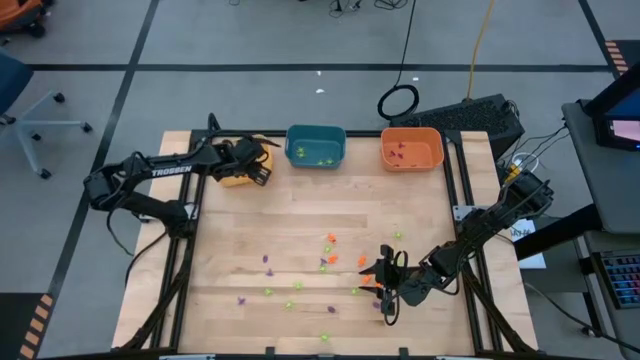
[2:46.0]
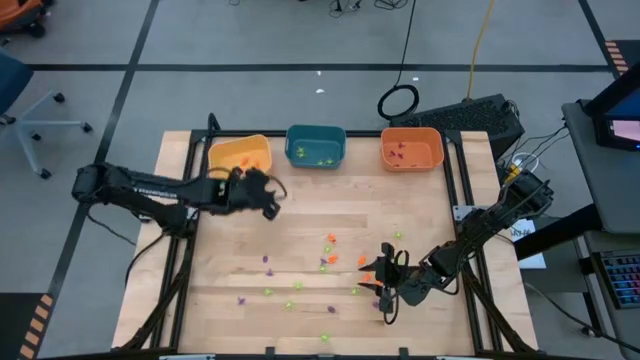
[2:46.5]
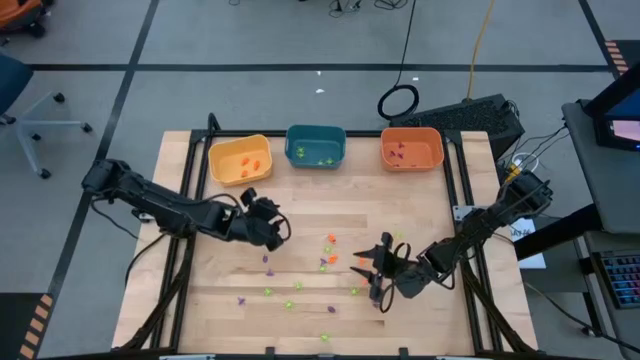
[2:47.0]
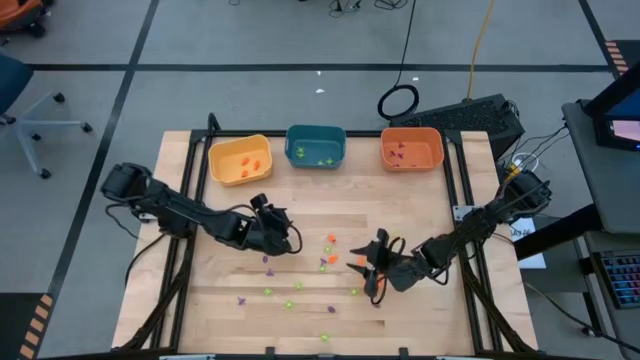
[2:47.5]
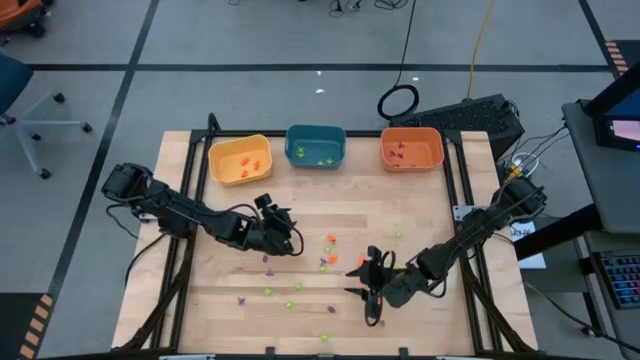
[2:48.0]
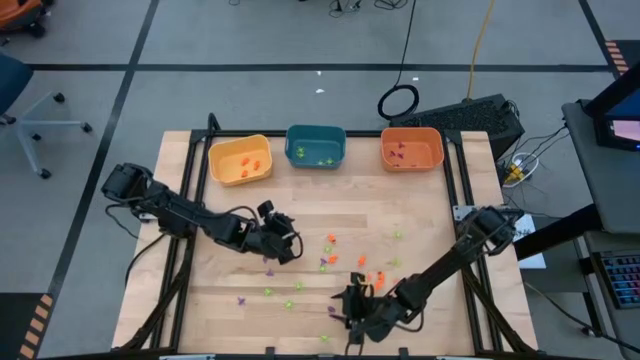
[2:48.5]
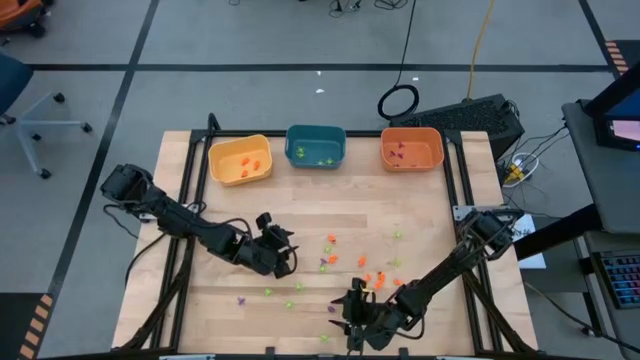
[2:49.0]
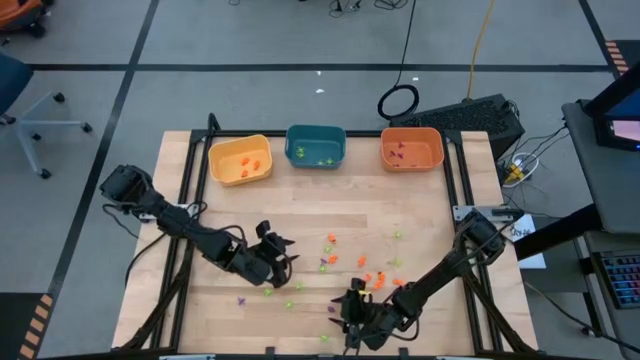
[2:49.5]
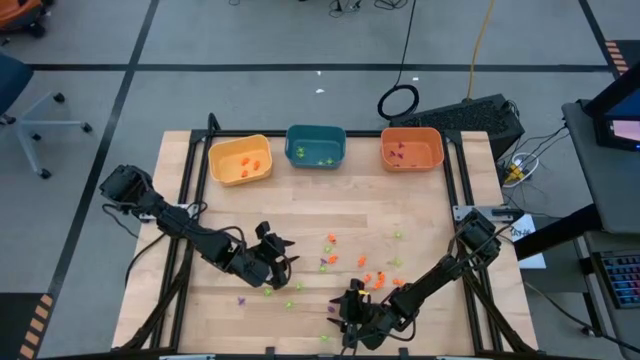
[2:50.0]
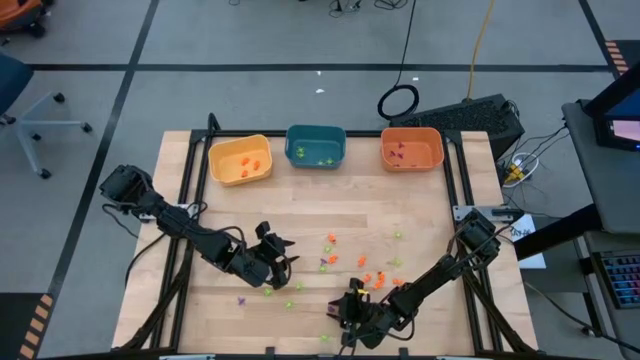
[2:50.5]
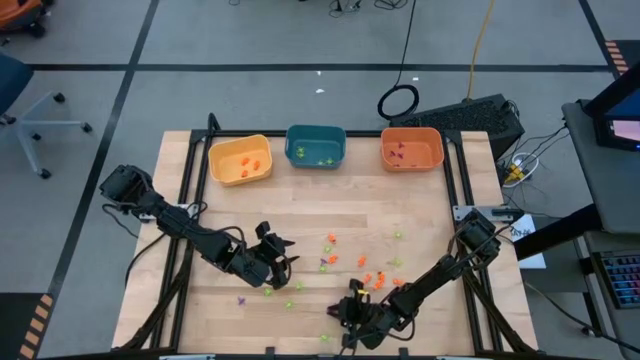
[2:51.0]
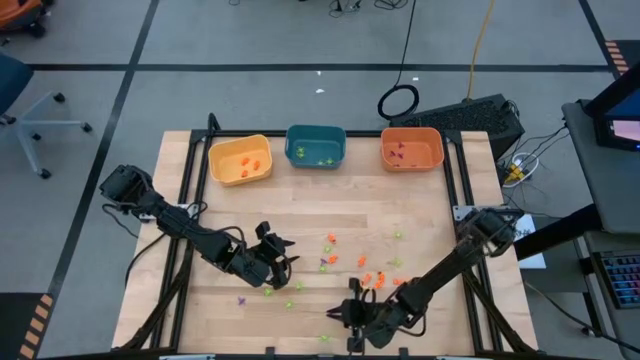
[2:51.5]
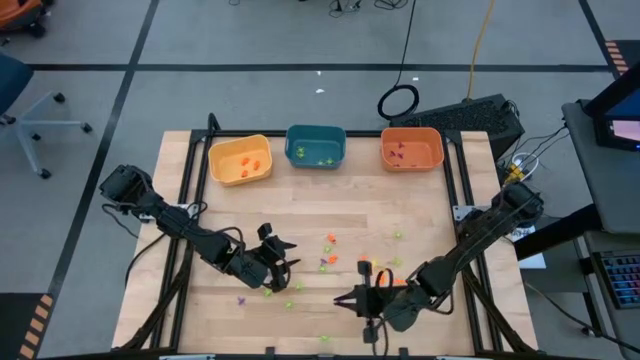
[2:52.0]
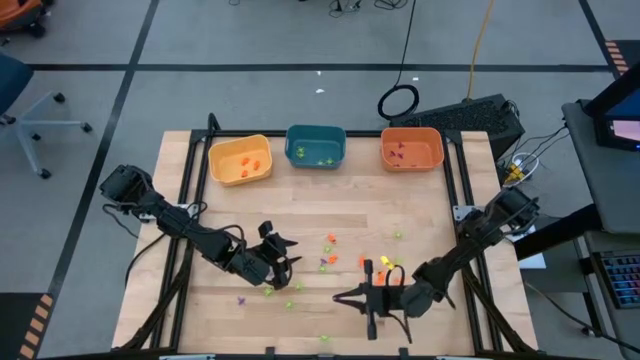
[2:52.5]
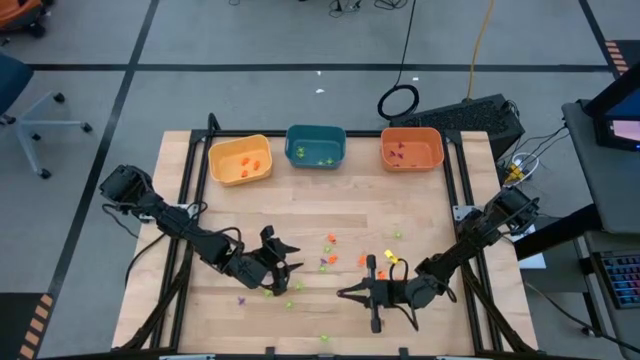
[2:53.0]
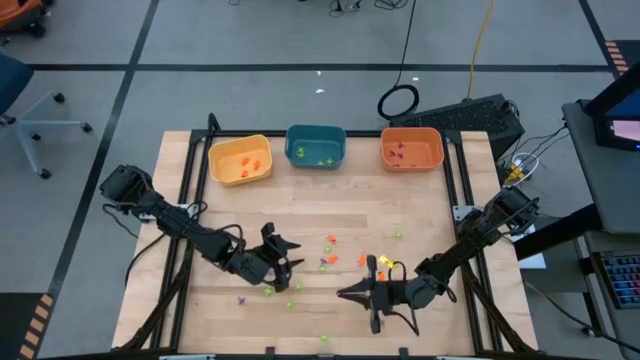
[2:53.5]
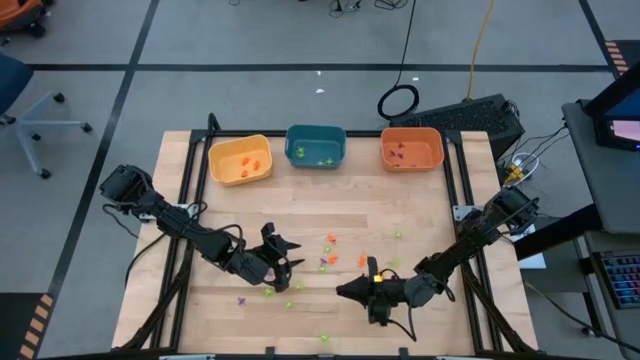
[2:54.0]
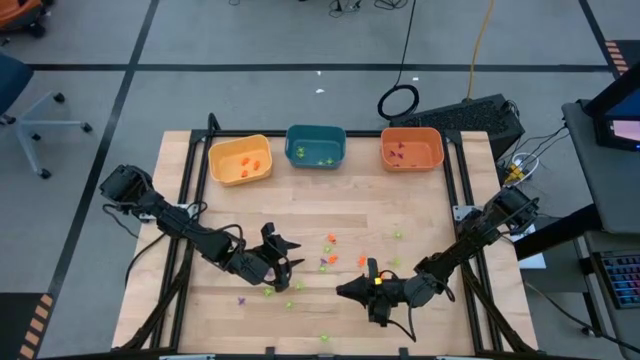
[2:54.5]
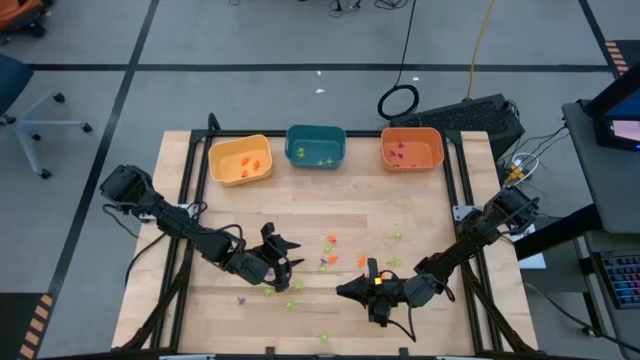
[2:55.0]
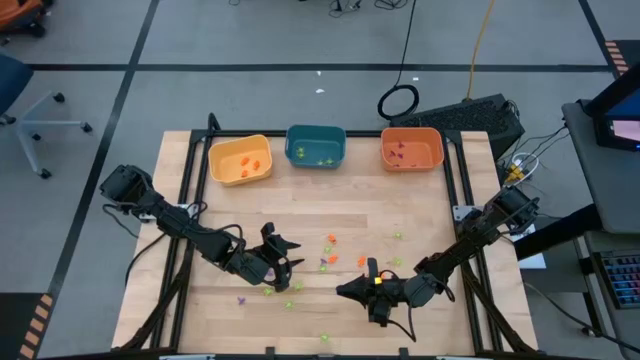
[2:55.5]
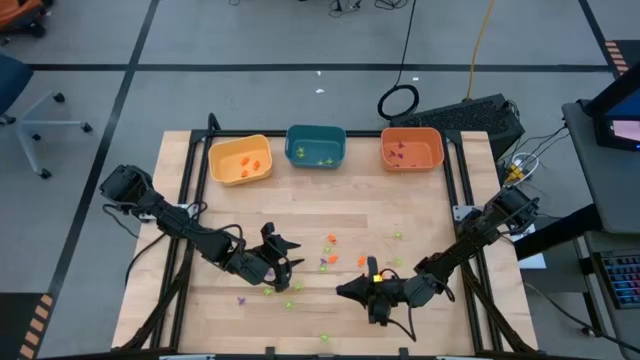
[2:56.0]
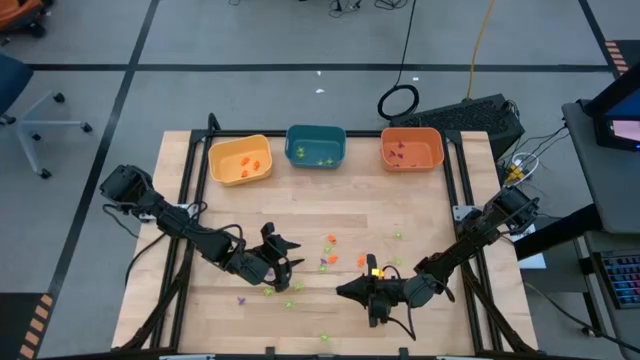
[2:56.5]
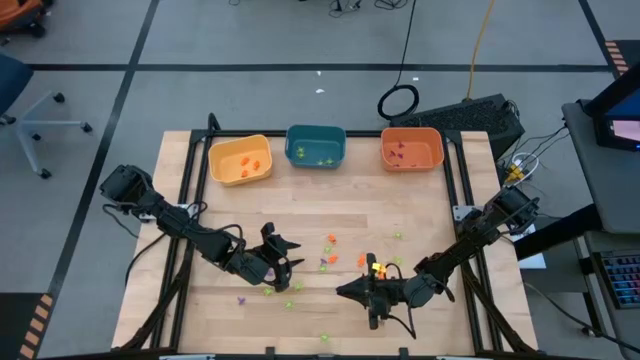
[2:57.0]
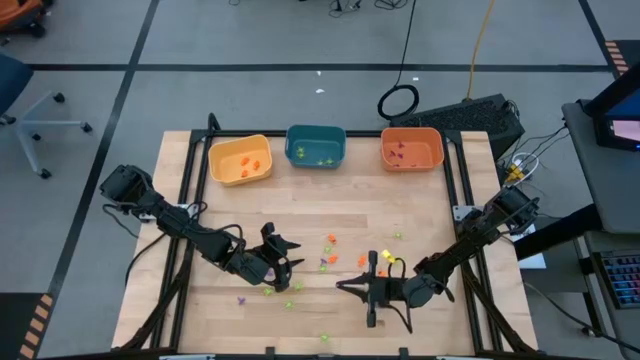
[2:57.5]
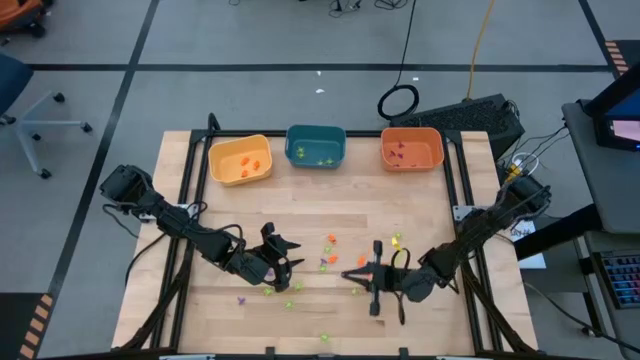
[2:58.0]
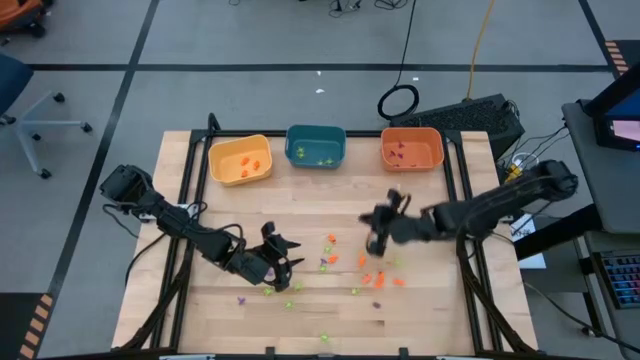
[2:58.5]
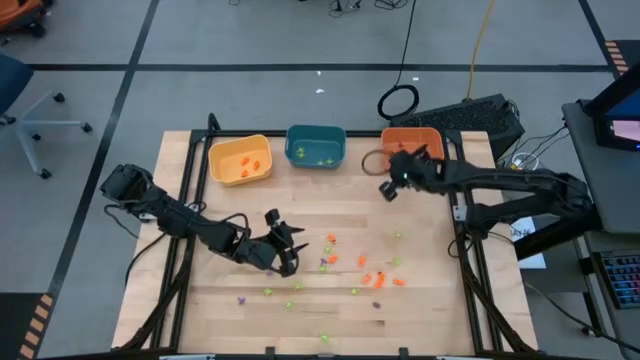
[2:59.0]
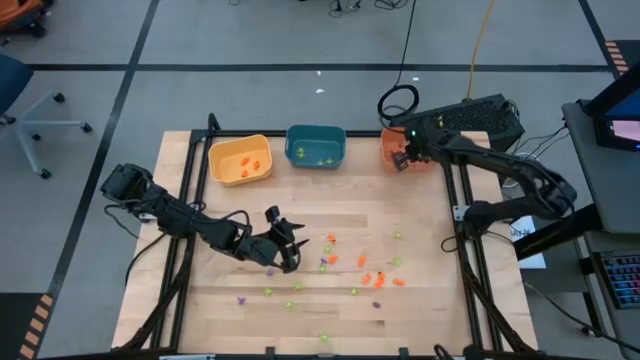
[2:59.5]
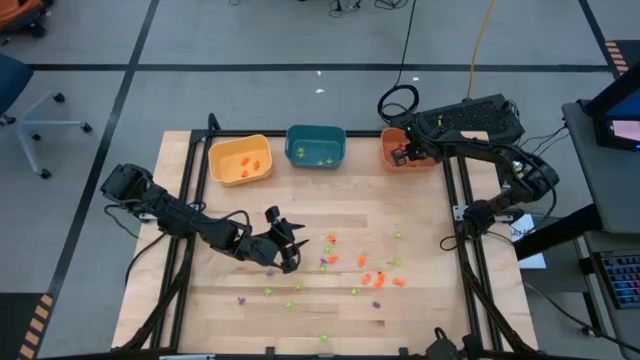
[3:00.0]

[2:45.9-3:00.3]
Task: Sort Halloween decoration
Put the violet witch hat toy into the orange bin

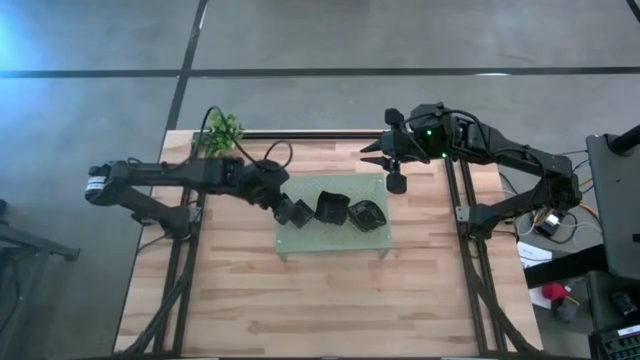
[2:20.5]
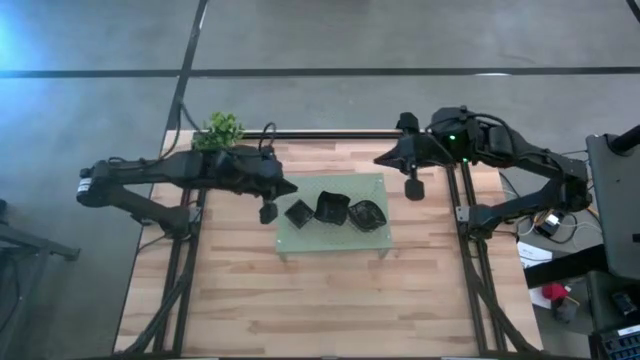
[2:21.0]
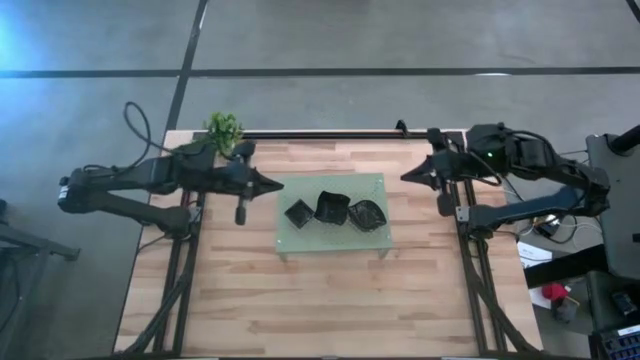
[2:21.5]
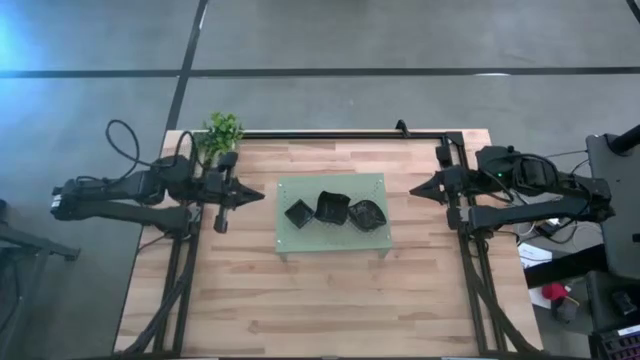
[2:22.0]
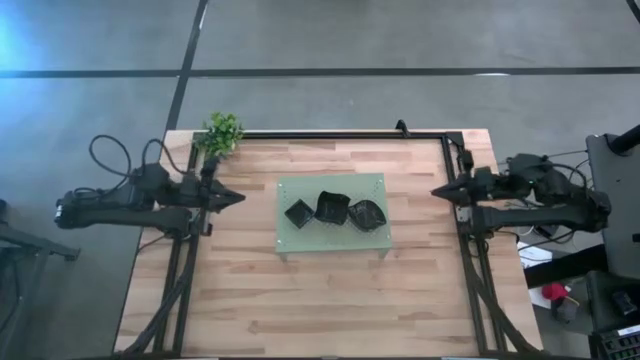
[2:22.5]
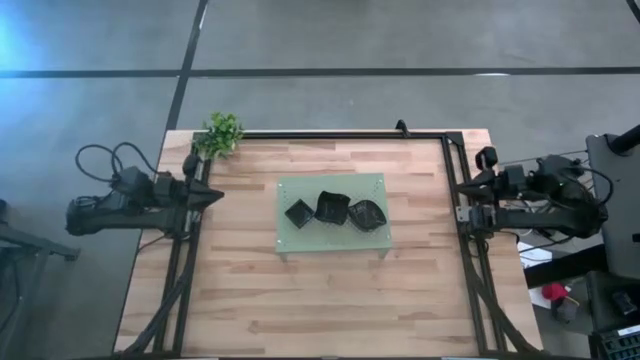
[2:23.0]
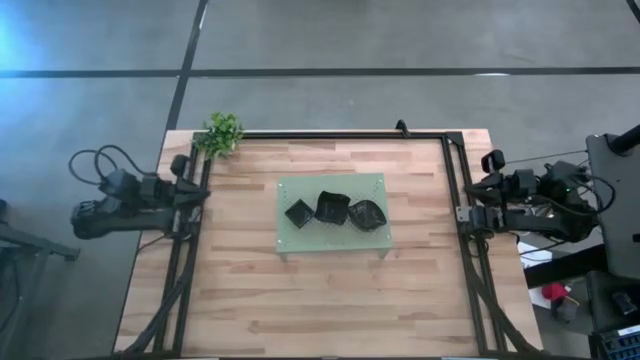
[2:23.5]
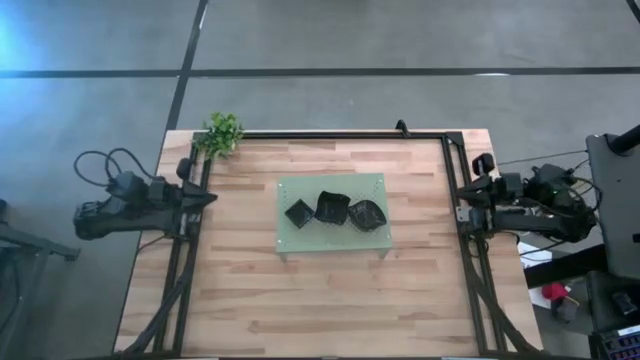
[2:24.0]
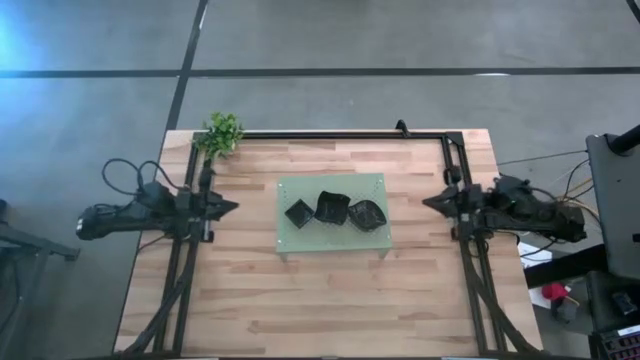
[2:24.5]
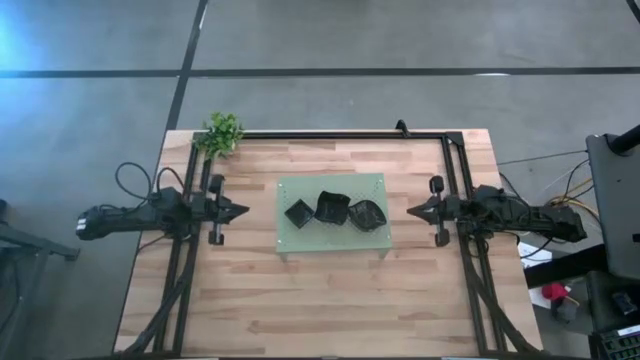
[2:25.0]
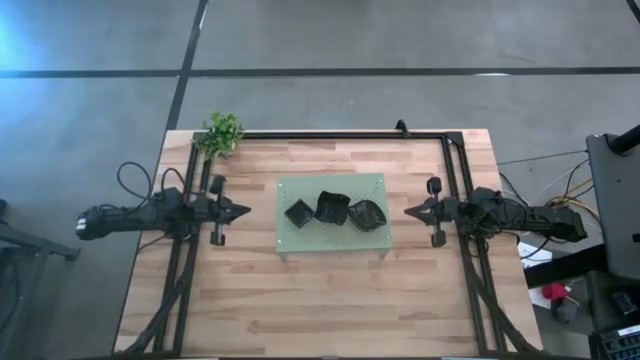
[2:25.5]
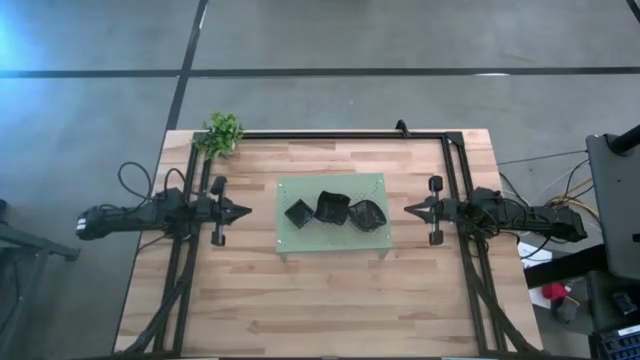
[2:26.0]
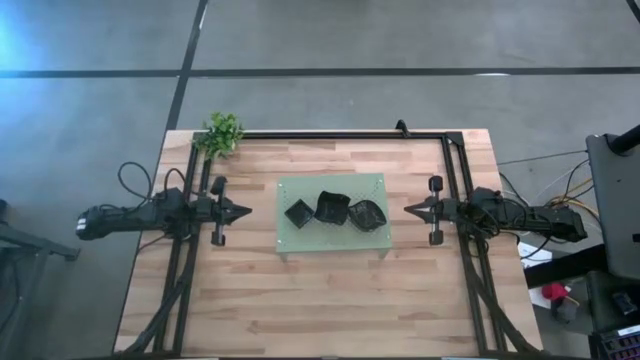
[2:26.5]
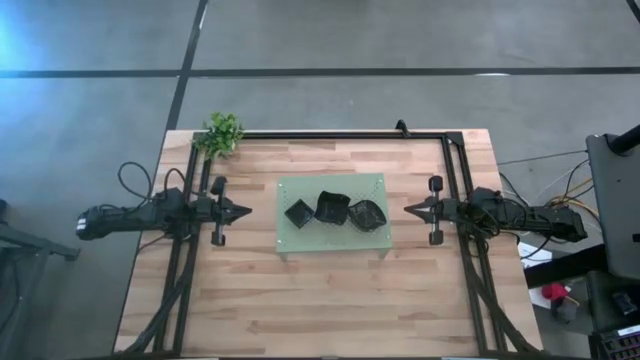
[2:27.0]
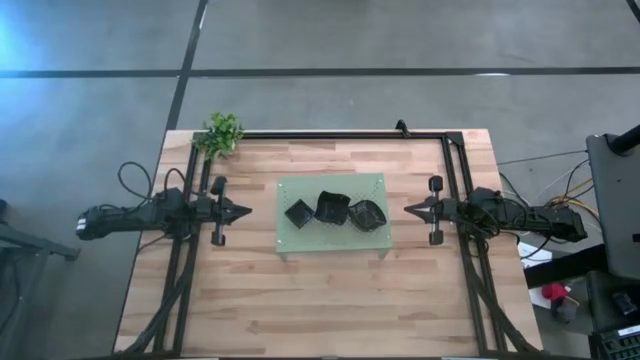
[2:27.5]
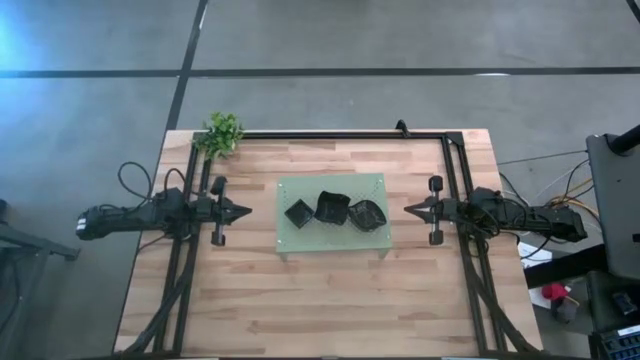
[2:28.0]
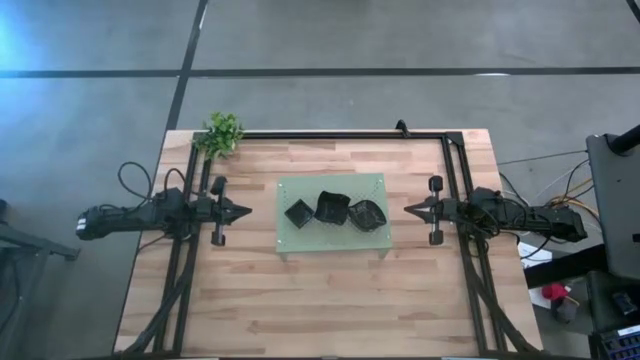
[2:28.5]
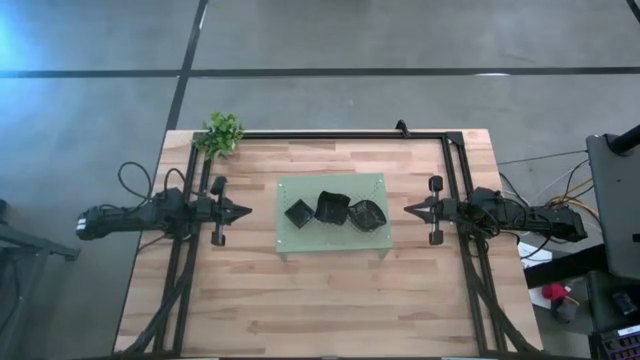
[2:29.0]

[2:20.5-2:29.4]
Task: Pick & Place Mini shaped plates
Return to Home Position
